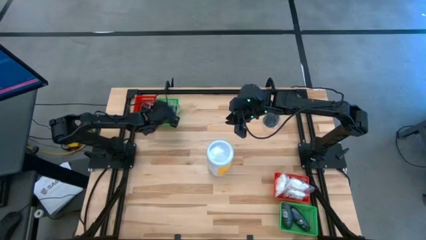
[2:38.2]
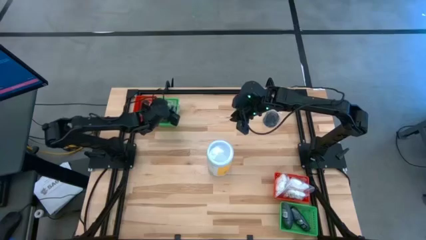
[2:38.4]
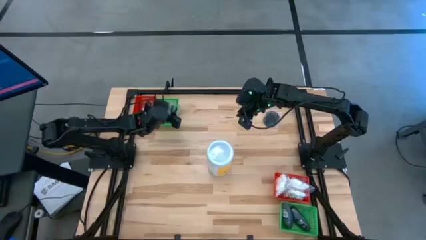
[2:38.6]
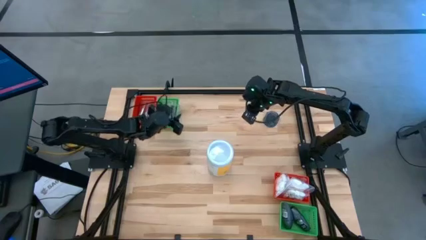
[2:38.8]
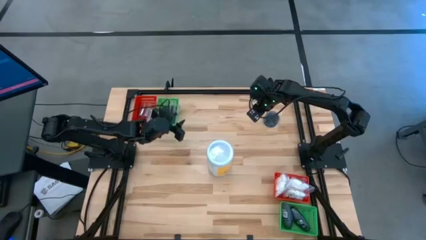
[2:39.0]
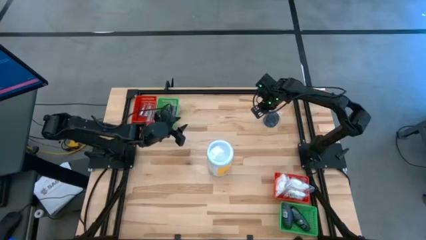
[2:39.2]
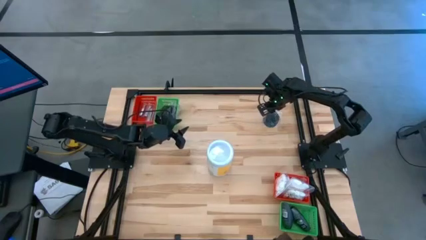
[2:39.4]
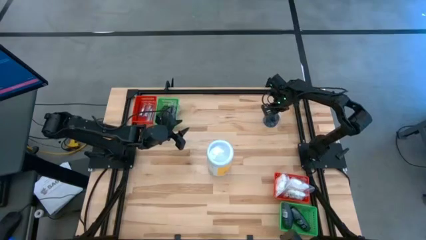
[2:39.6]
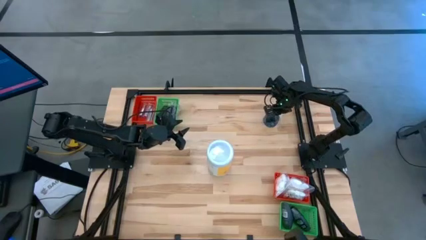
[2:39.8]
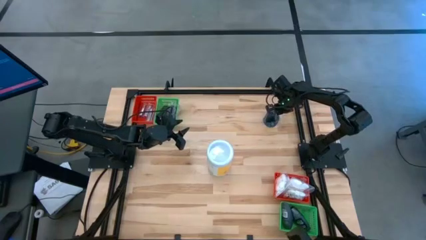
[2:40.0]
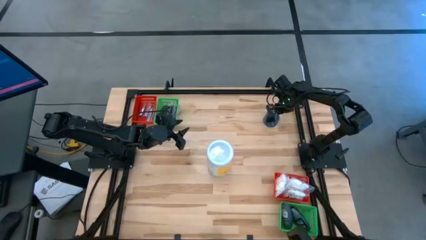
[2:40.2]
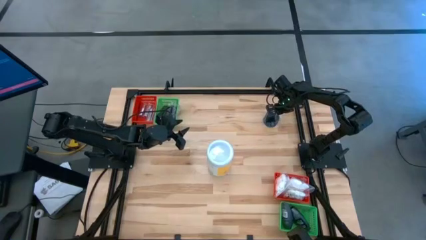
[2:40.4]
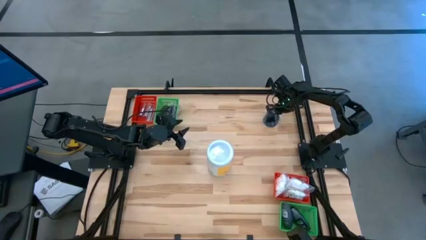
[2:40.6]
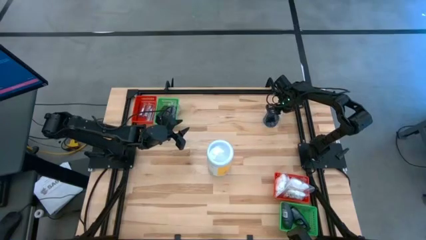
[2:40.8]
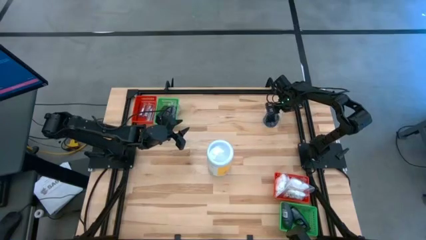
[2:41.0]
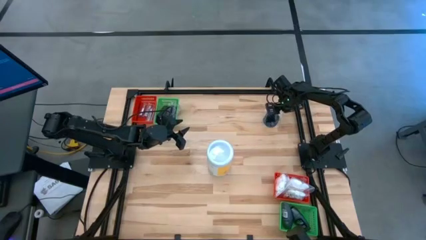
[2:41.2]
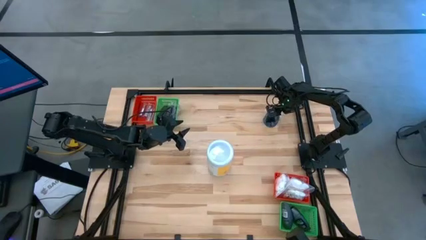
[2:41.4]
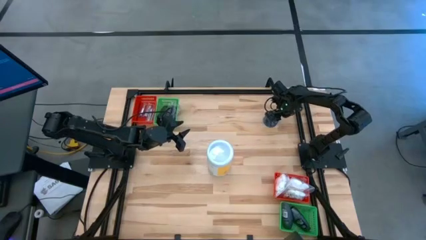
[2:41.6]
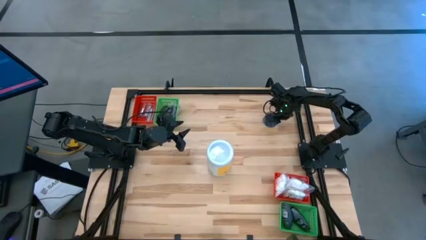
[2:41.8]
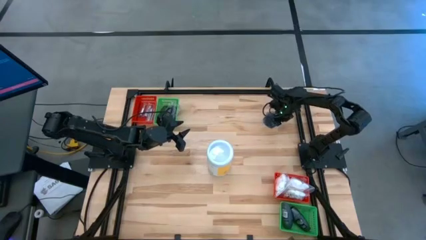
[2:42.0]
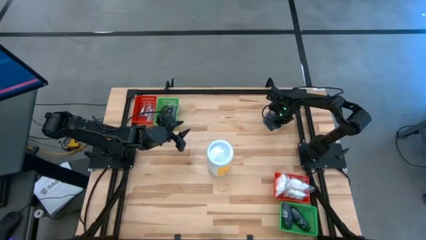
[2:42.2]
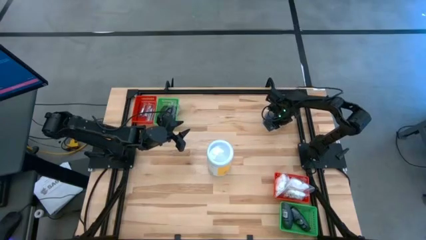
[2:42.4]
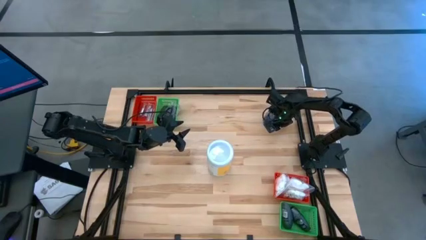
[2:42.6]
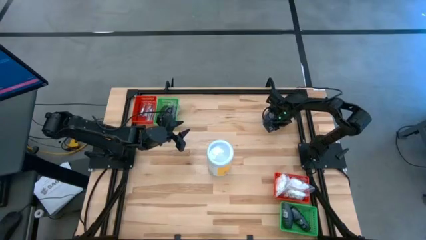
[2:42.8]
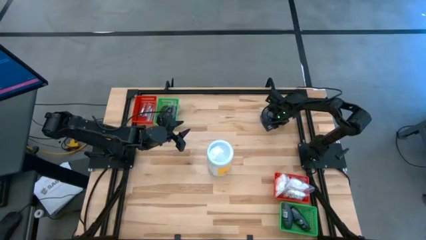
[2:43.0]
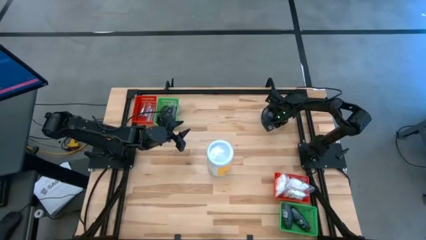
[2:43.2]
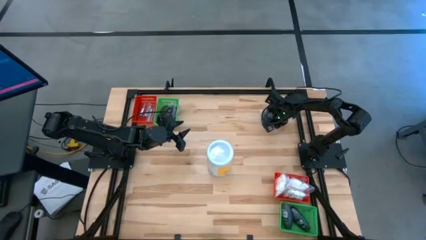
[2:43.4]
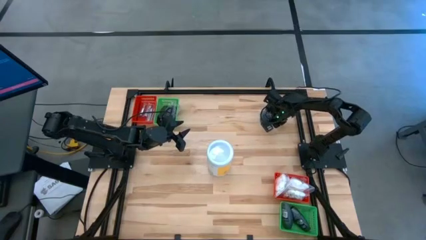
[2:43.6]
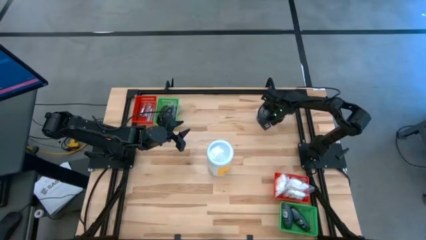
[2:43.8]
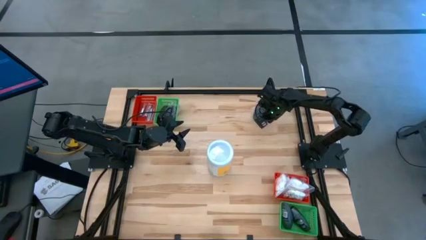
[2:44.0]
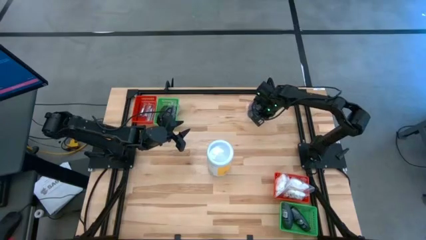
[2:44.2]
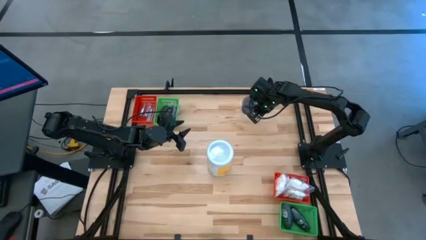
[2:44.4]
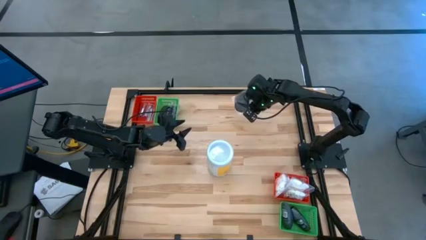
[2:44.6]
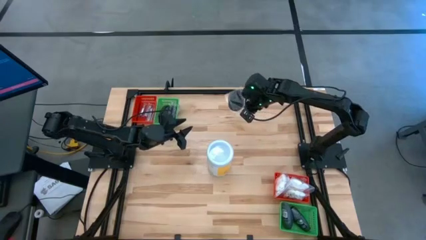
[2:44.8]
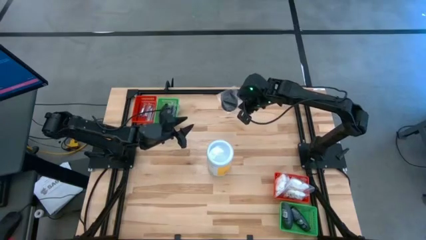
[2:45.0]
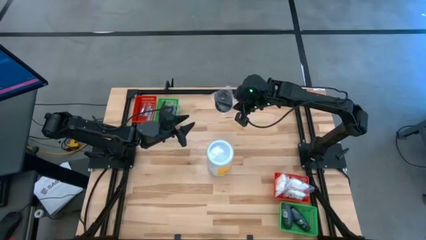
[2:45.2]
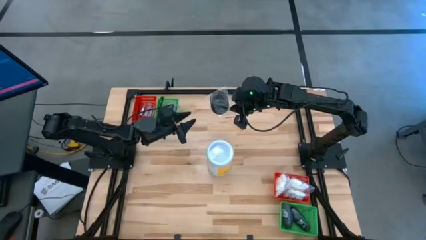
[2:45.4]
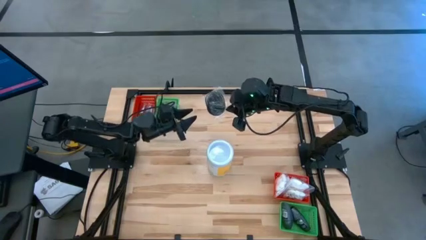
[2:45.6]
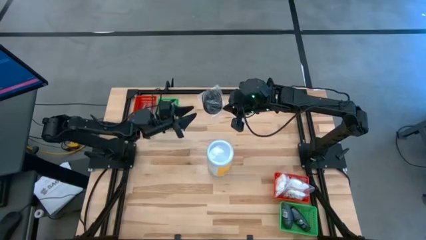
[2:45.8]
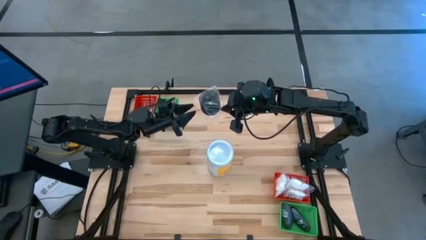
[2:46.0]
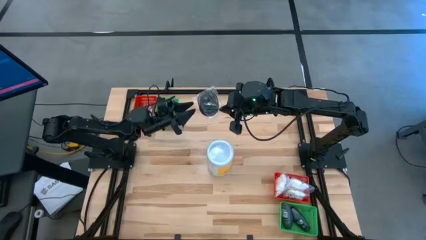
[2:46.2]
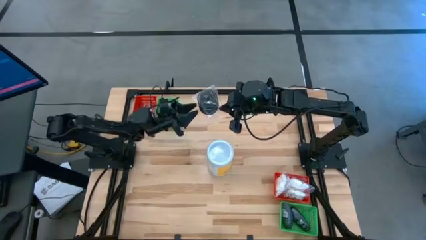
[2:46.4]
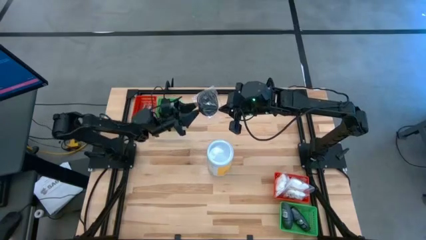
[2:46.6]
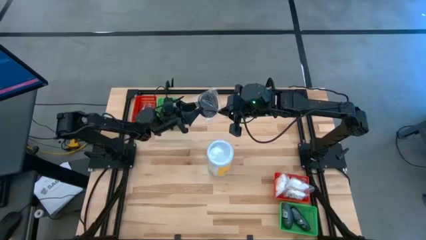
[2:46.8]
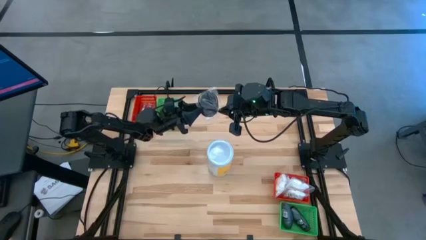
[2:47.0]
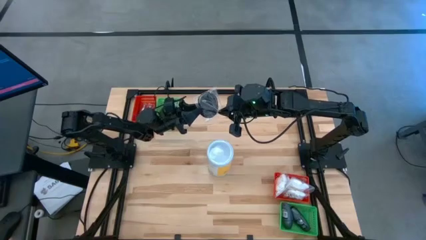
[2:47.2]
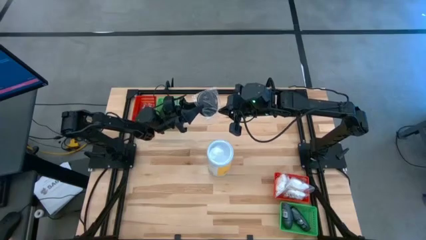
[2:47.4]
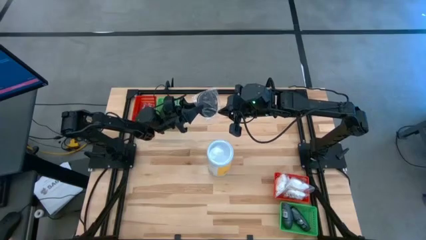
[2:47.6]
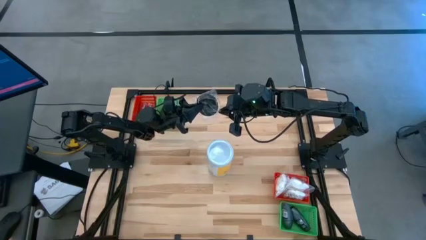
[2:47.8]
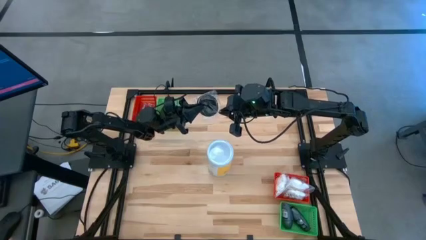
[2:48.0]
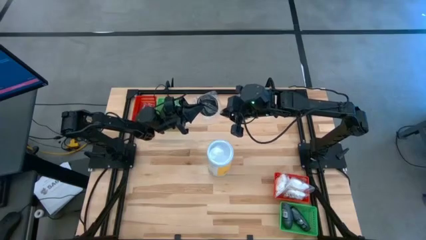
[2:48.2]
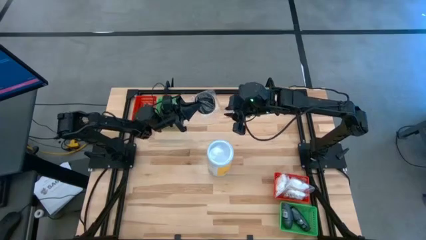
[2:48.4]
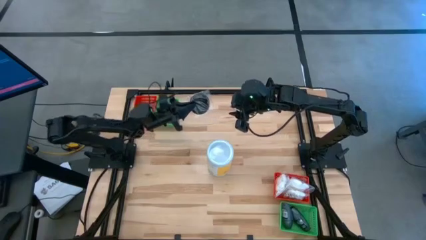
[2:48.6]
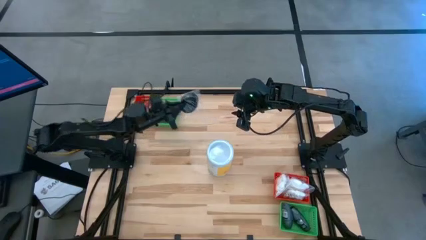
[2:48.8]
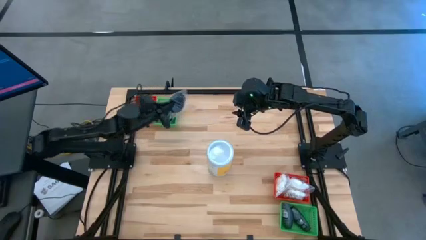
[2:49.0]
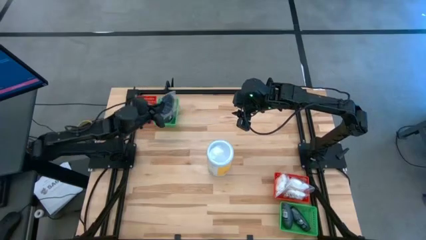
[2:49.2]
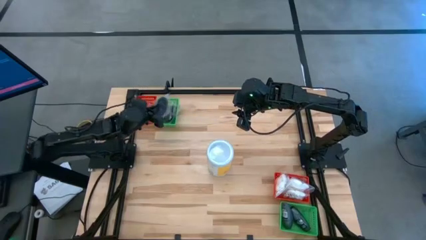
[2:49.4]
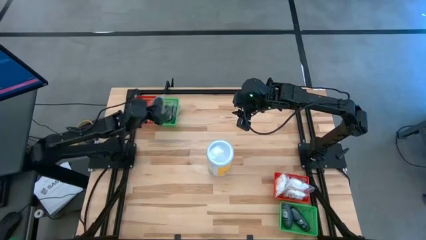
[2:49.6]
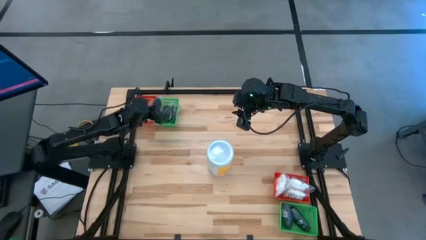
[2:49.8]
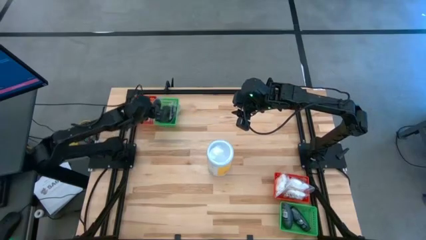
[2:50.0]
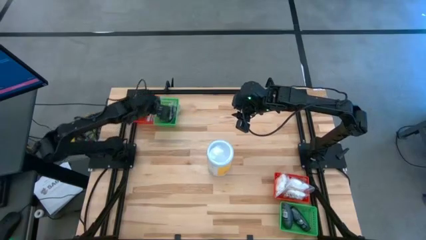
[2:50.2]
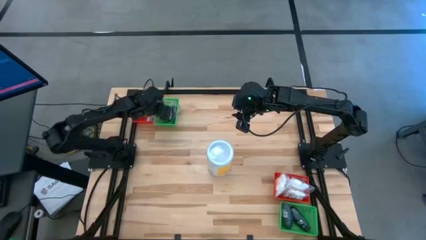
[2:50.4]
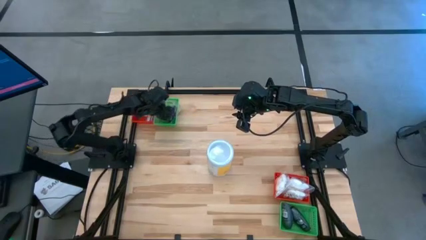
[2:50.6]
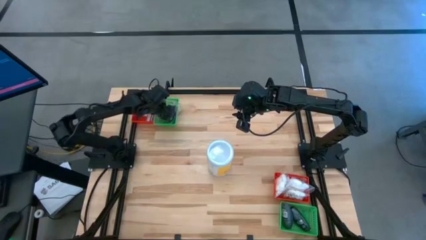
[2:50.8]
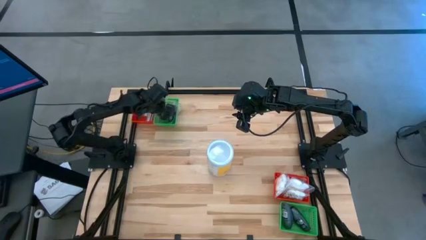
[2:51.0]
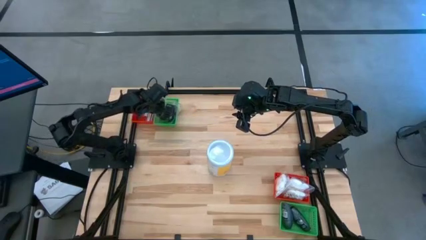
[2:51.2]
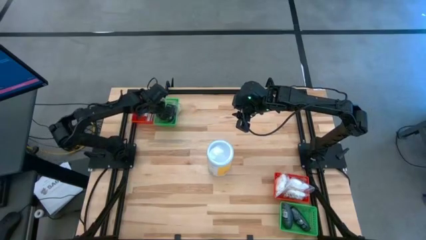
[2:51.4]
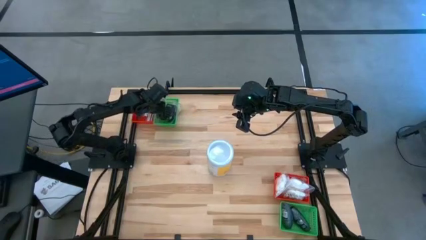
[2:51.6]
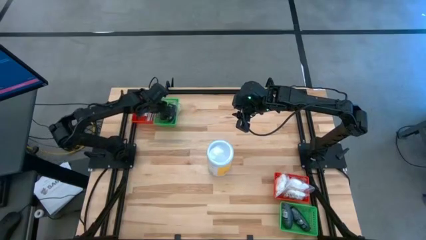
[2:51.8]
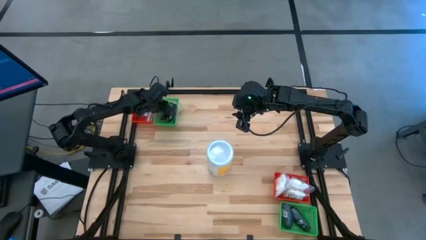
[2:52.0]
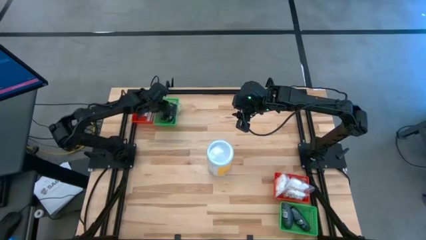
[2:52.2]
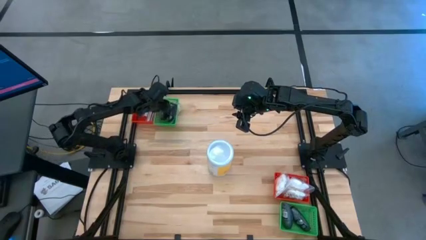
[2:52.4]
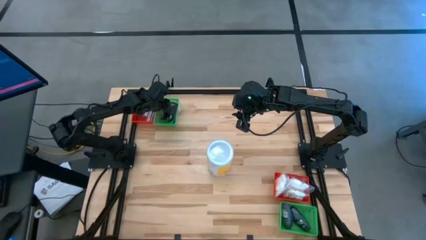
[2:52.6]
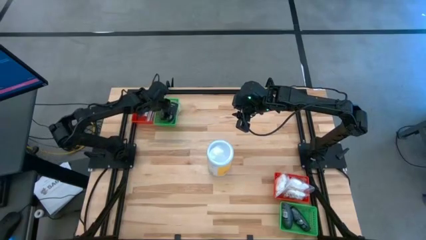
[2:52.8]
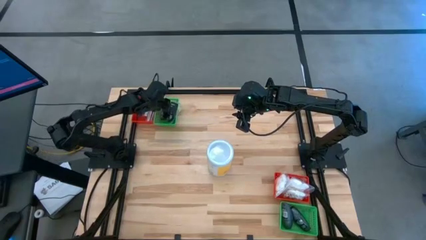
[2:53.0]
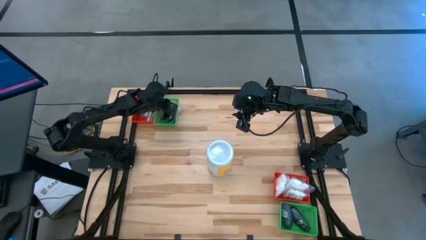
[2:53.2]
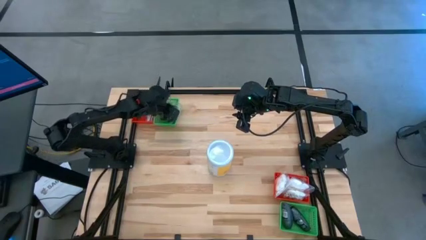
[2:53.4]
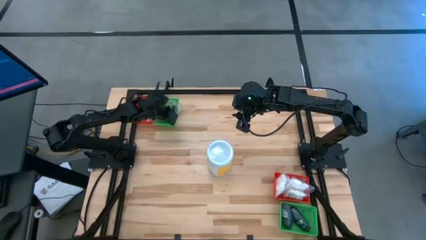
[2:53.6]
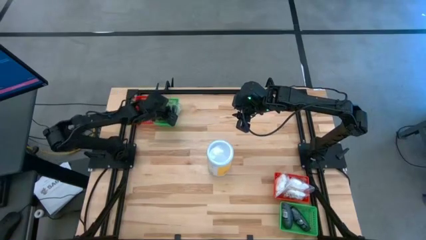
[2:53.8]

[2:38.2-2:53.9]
Task: Pick & Place Travel size toiletries
Put the black hairbrush into the top green basket
